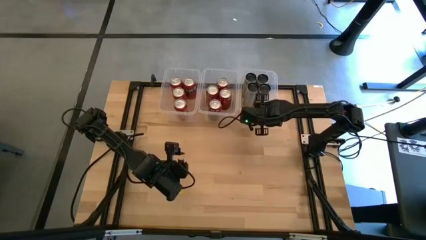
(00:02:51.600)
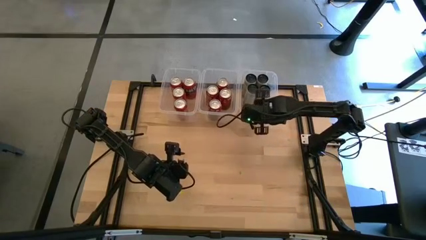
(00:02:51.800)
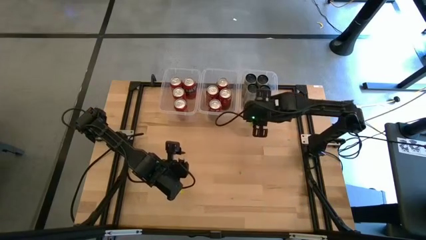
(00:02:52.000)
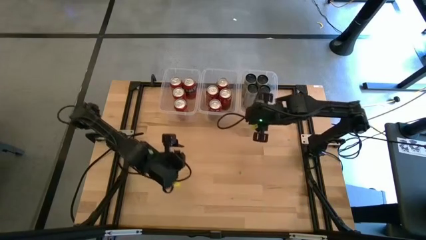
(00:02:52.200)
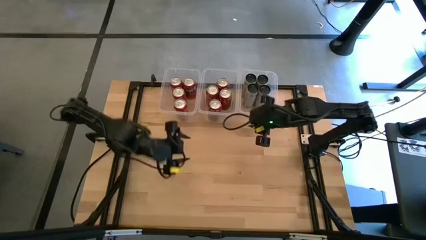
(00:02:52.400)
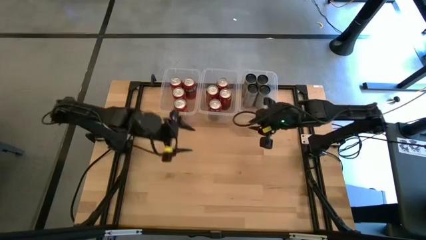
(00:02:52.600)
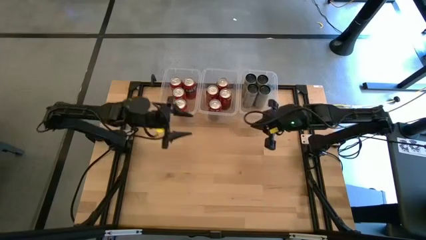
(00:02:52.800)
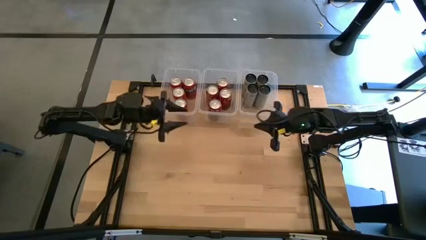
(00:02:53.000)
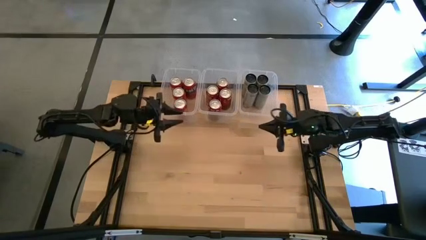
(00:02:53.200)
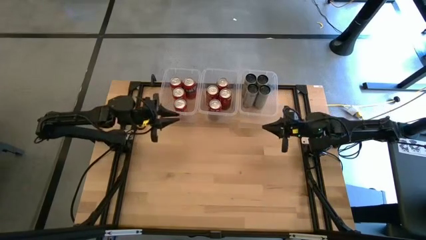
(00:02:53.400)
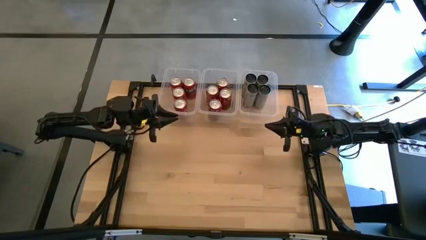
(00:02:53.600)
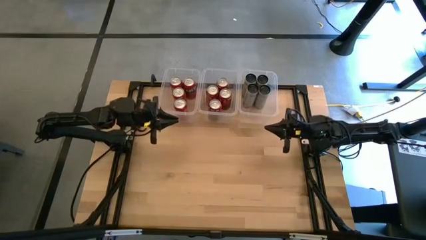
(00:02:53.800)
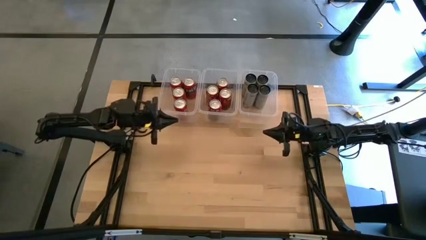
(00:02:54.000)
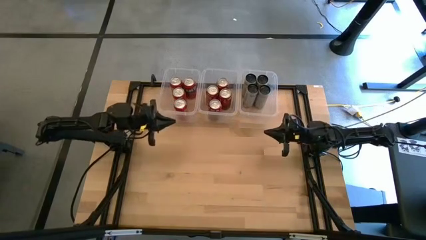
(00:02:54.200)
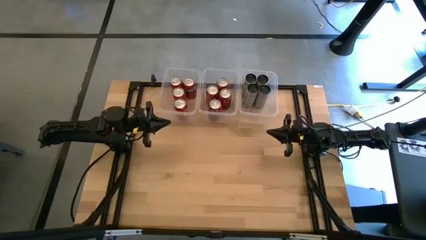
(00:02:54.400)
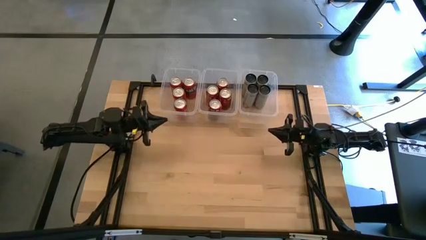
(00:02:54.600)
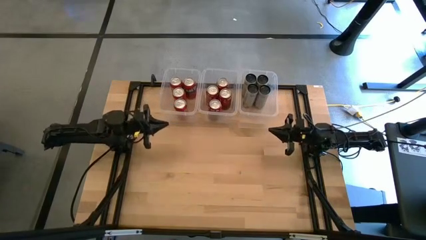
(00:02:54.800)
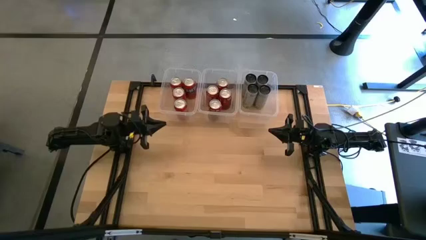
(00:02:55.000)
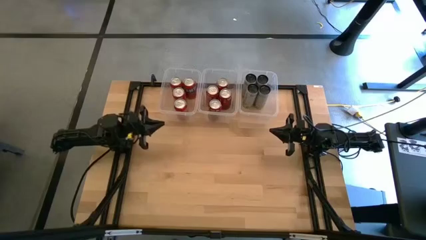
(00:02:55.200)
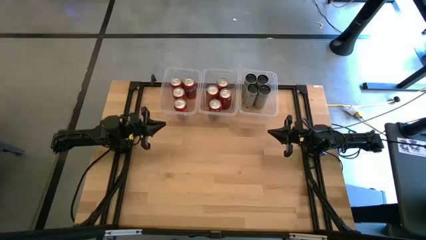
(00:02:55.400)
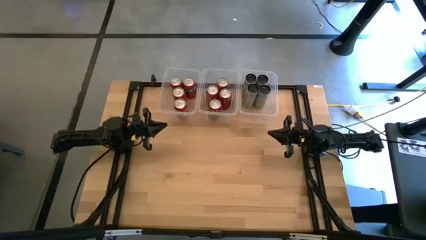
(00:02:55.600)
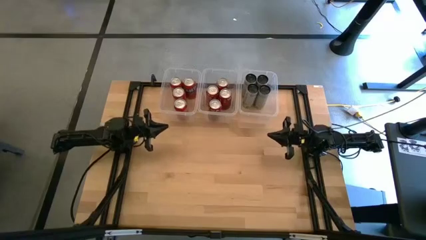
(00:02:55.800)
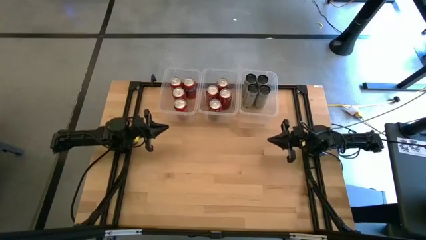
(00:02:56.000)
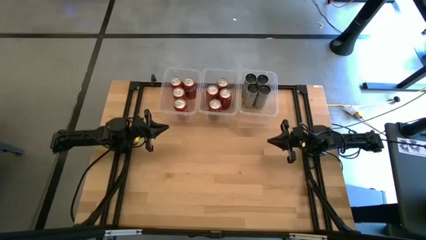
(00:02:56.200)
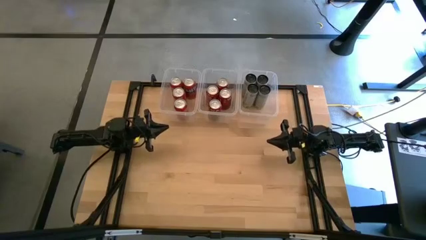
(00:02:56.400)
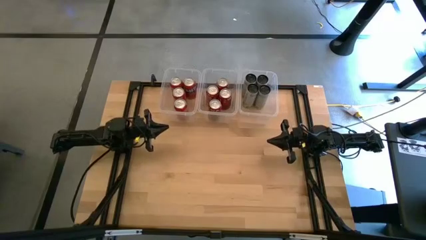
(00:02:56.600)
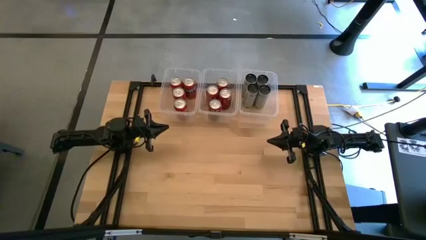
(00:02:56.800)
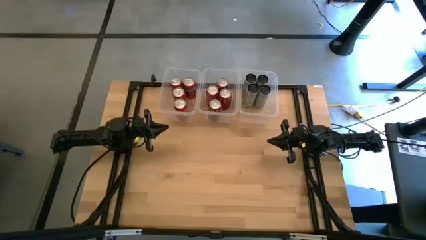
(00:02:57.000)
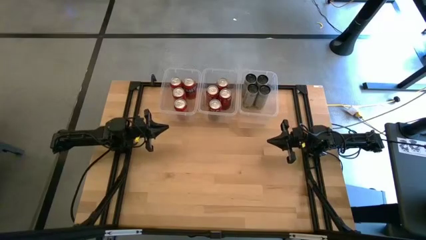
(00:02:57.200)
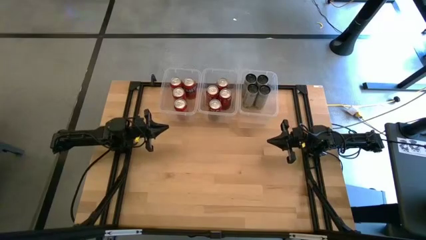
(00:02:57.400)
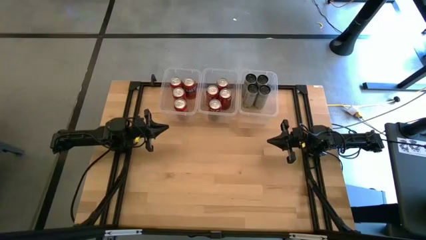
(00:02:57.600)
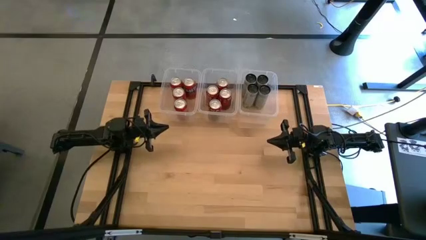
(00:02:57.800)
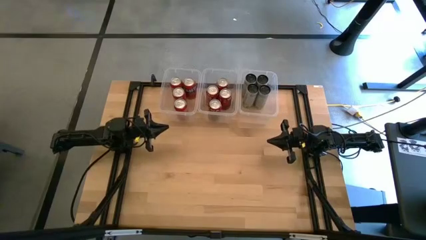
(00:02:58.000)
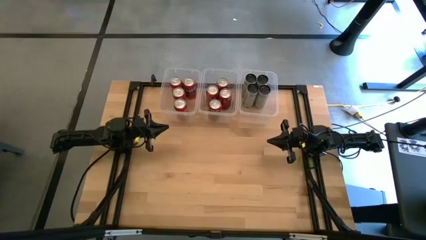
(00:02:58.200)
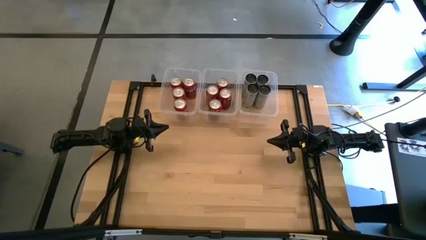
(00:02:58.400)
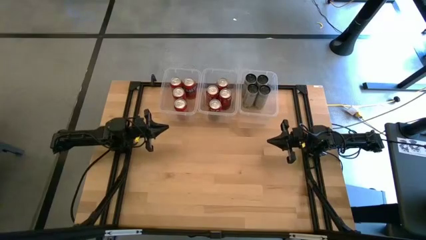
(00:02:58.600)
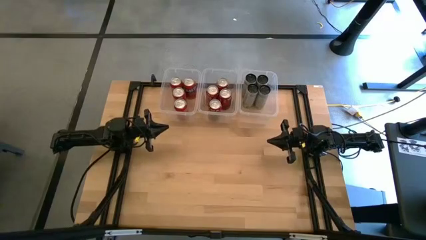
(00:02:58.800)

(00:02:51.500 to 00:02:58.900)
Task: Sort soda cans
Return to Home Position

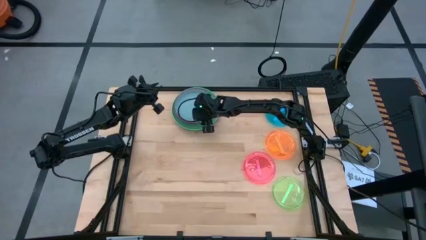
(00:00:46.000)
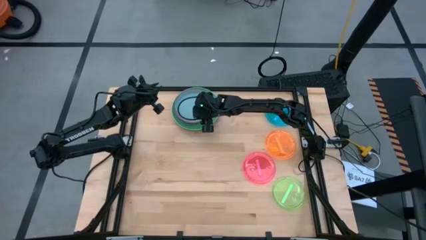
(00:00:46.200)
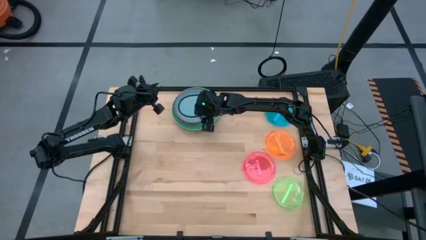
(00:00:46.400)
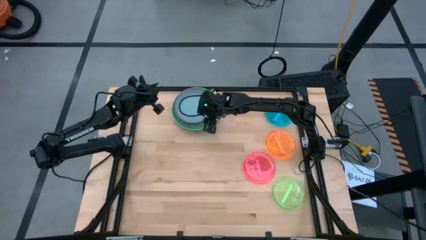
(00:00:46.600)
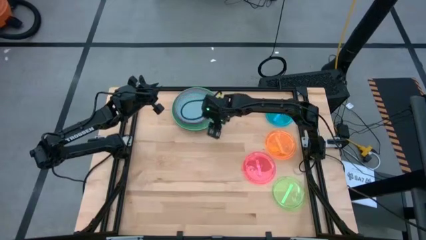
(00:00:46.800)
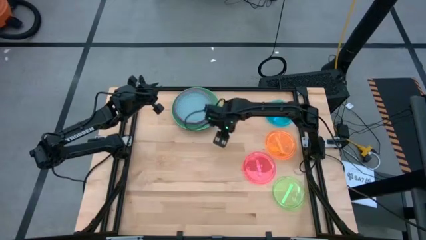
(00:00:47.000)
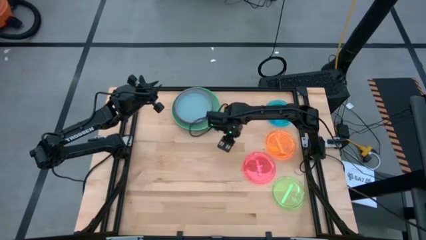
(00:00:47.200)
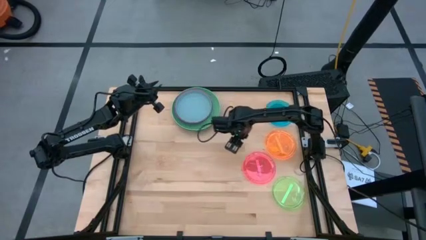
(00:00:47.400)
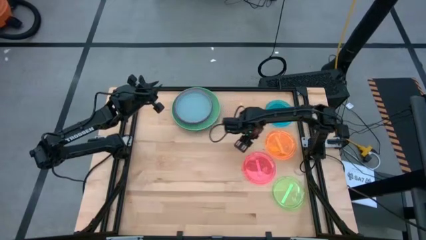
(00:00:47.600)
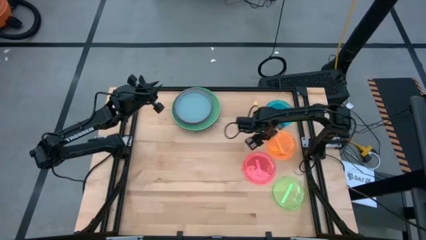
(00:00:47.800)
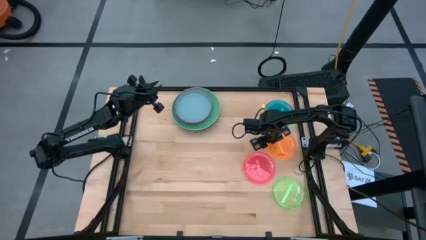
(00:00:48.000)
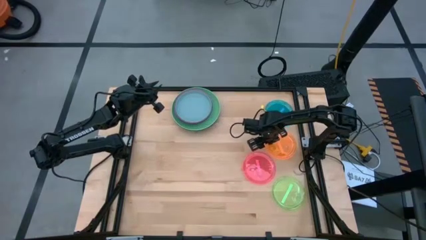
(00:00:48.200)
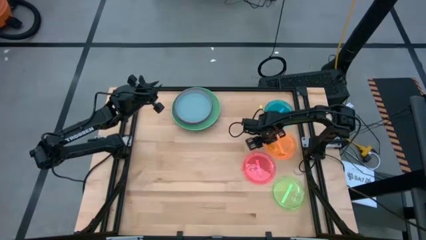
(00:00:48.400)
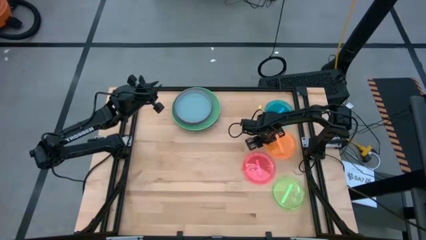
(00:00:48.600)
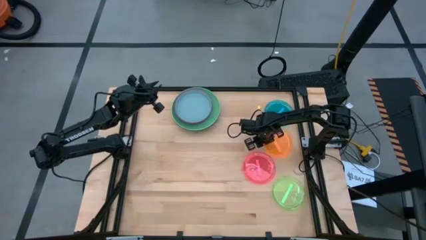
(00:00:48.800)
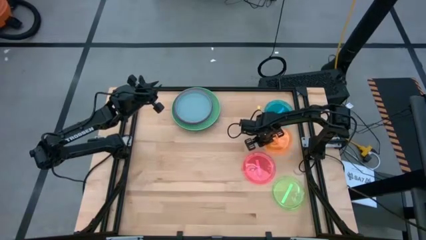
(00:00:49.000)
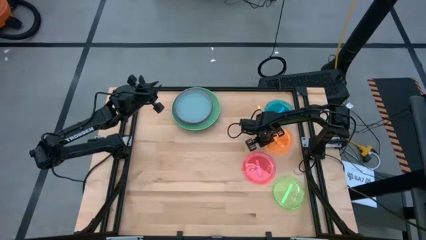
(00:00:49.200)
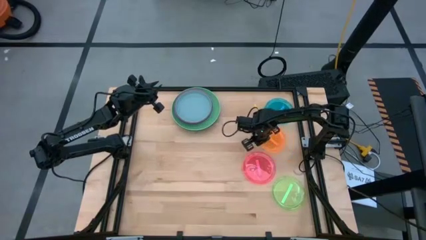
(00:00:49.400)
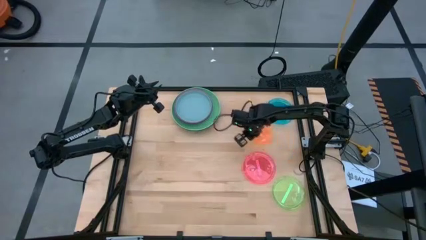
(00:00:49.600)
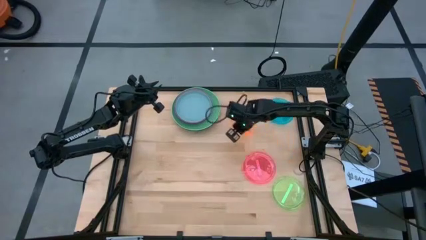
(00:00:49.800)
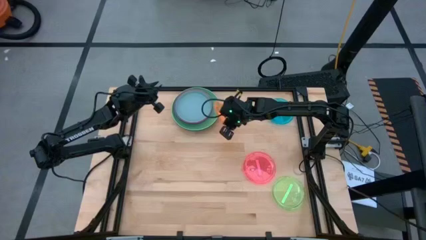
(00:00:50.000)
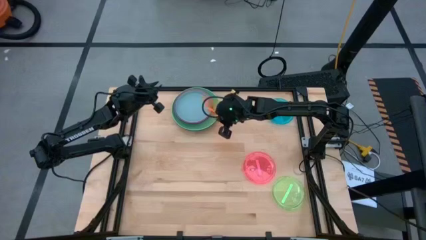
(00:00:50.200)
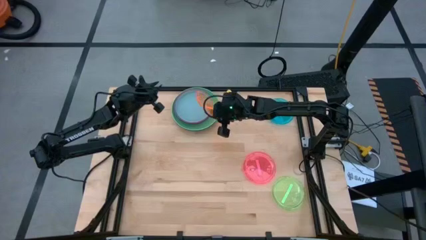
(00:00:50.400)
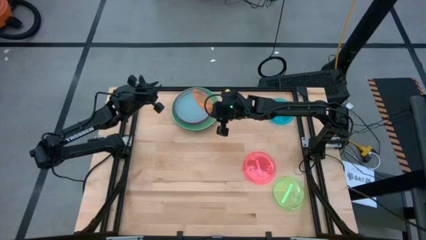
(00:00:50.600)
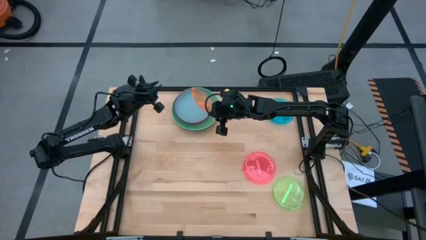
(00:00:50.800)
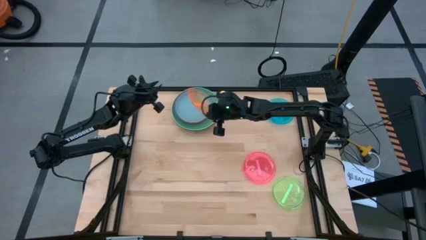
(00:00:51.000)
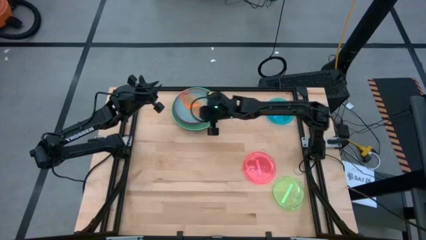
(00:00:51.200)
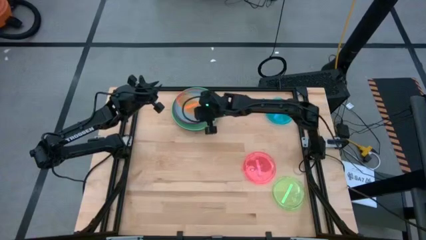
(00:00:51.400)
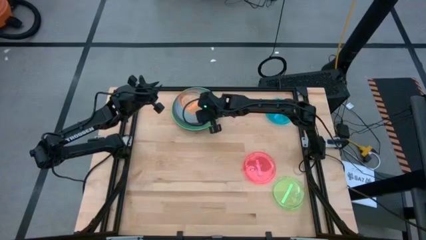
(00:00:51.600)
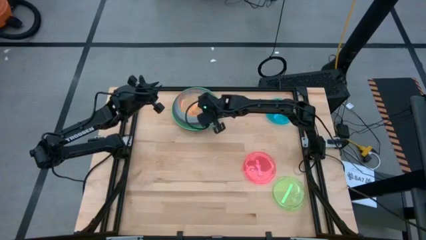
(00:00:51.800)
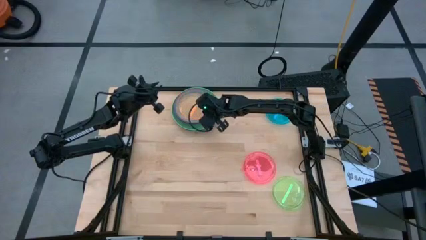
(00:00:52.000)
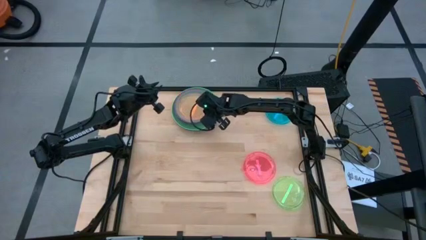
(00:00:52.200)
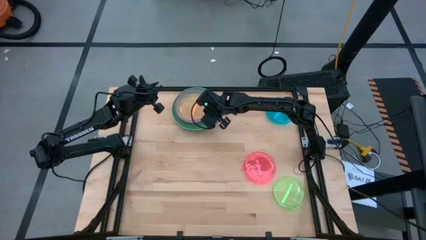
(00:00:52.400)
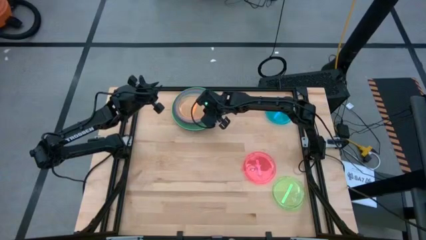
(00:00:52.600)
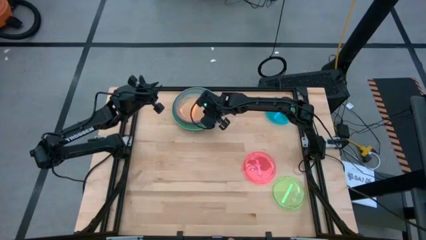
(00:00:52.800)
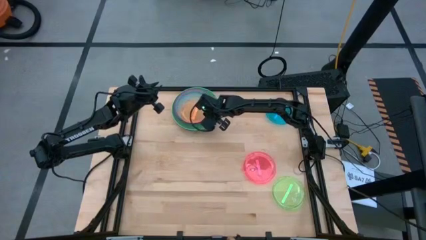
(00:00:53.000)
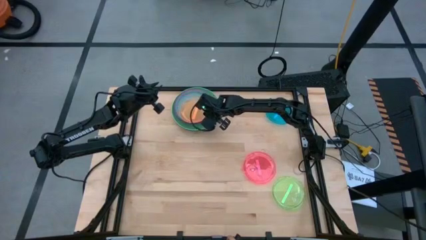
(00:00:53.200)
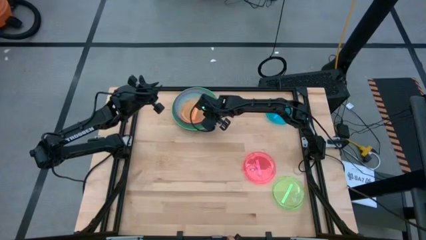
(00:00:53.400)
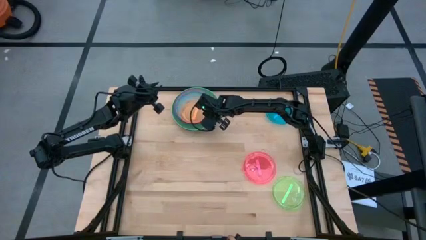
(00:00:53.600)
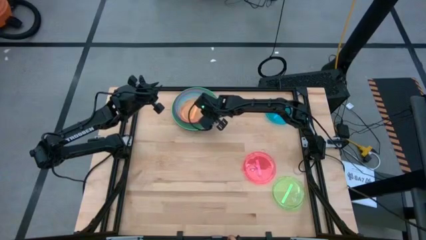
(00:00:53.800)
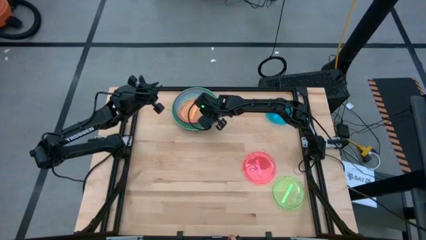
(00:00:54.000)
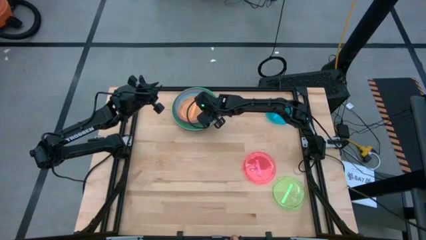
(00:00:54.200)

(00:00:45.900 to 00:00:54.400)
Task: Stack plastic plates
Stack the orange plate on the light blue plate
